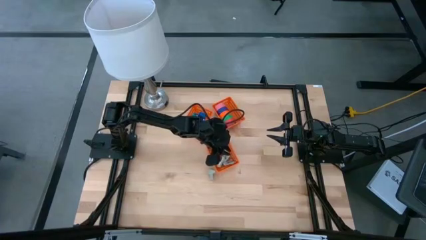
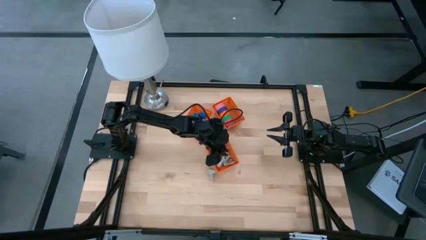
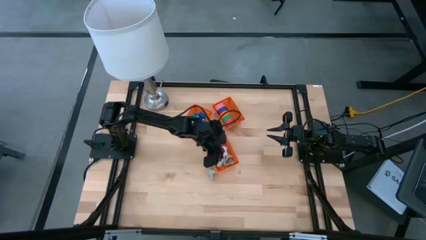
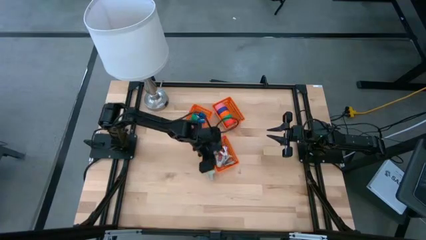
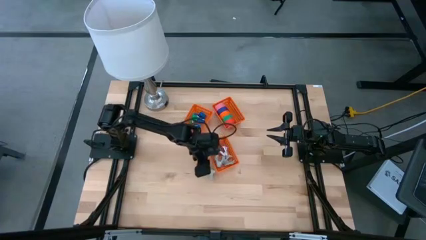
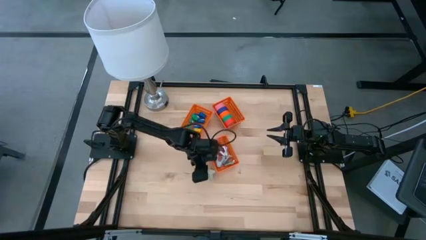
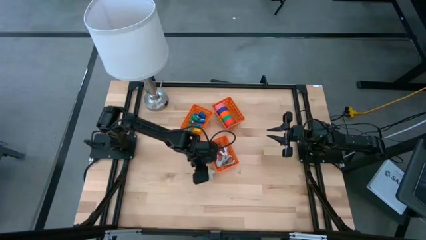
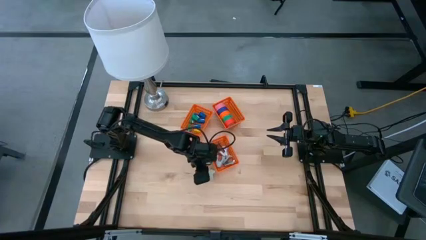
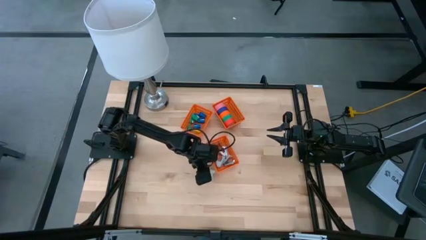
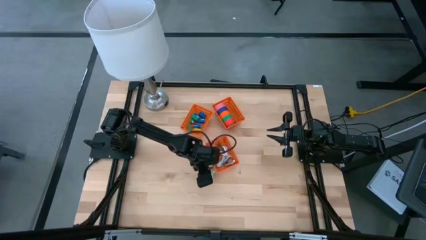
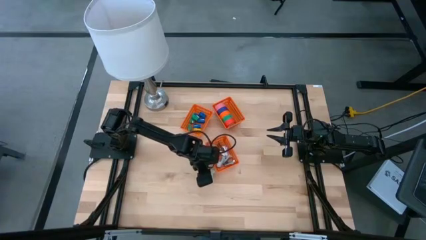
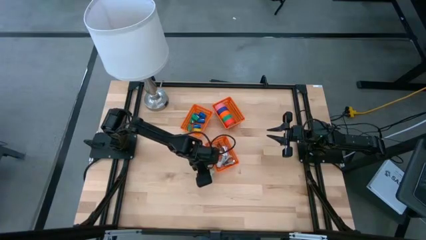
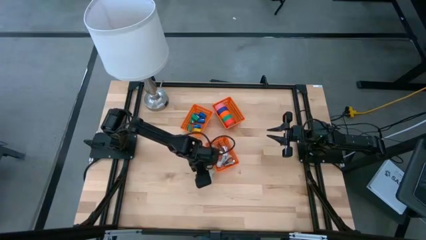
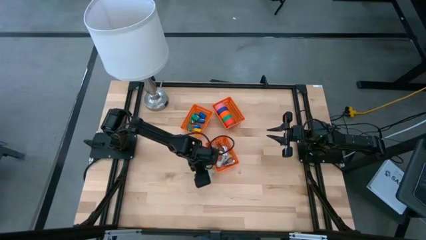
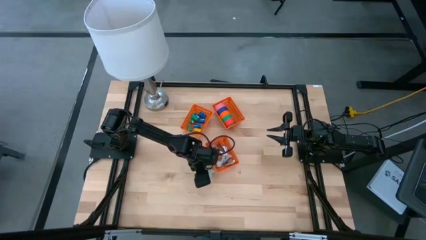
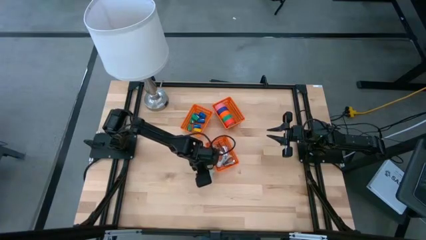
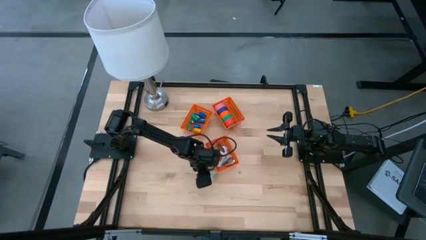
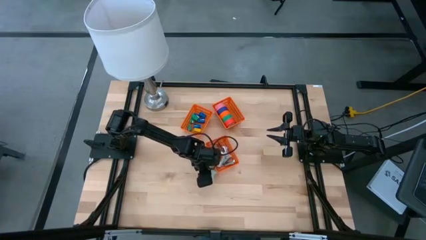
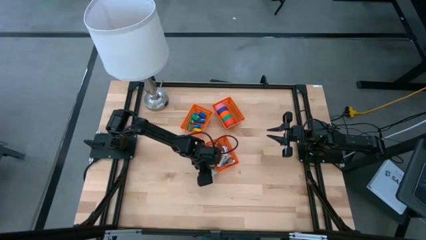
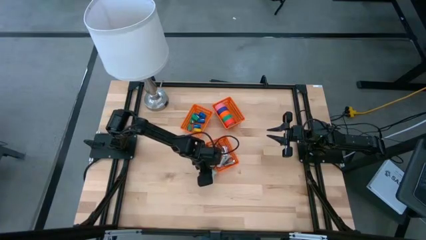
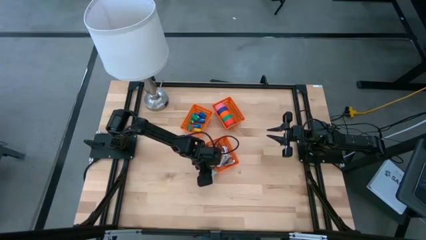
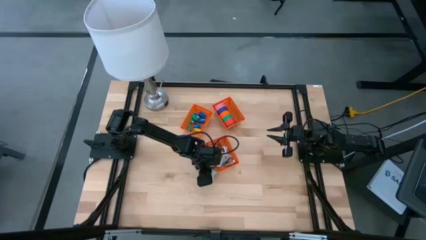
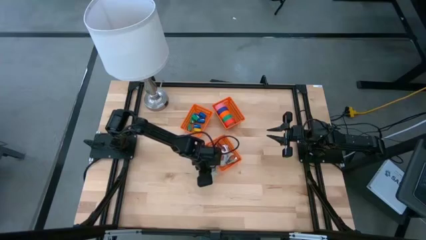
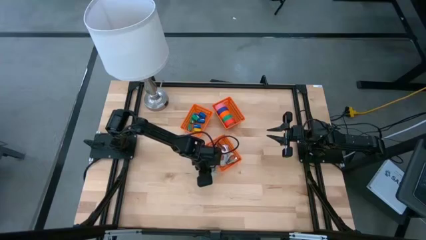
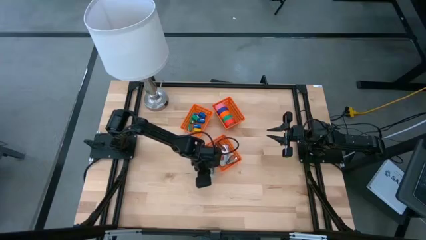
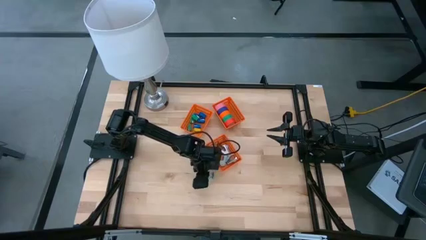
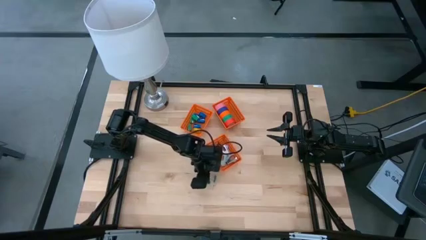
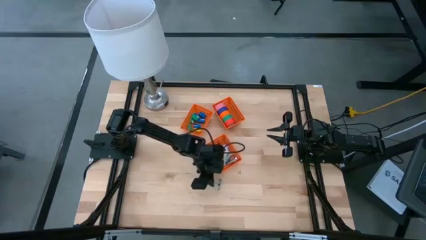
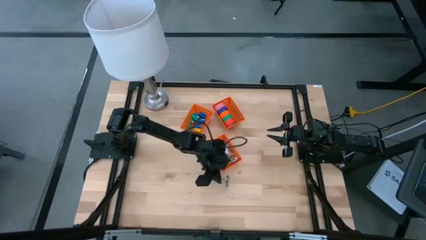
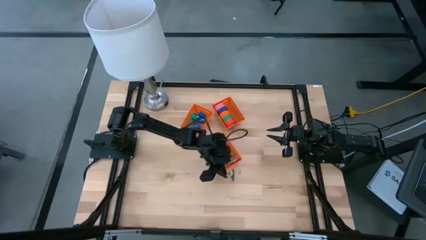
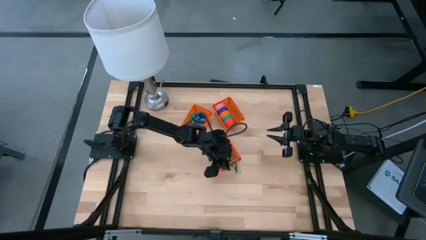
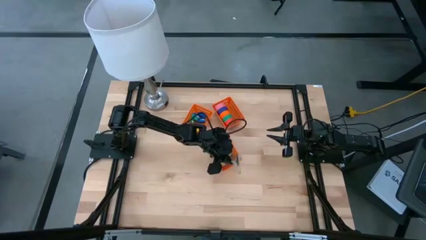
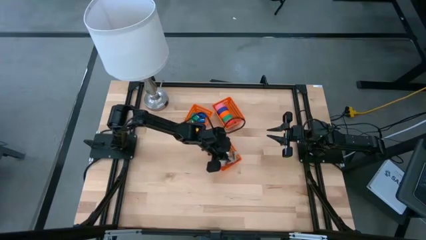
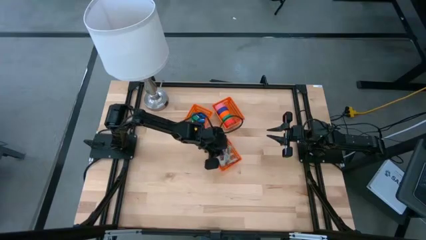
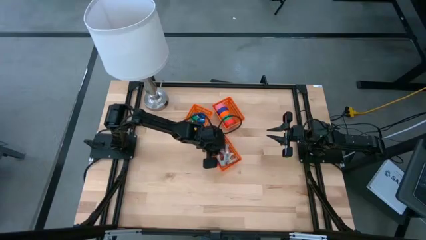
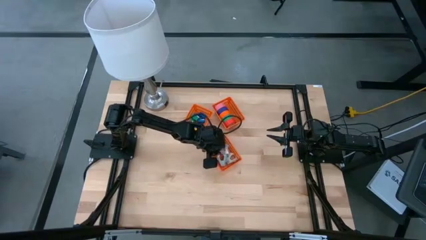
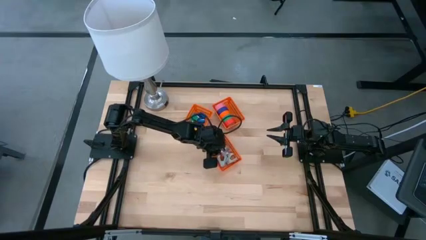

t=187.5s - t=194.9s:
Task: Pick and place Stapler, Stapler remover, tape
Put the gray staple remover into the middle orange bin

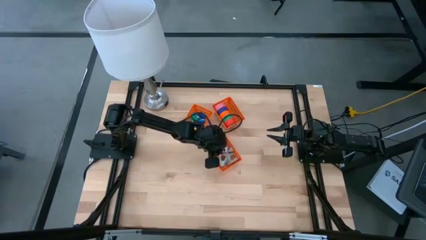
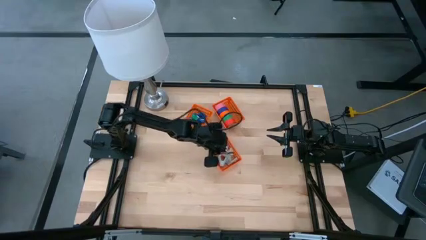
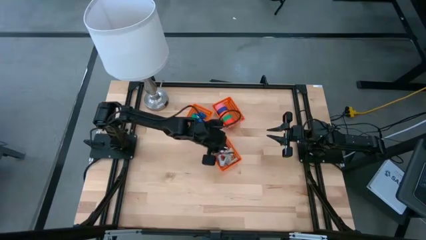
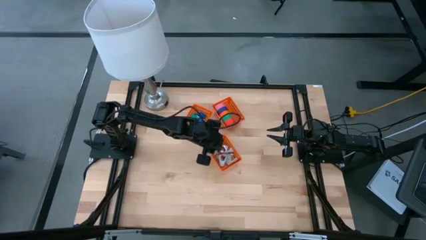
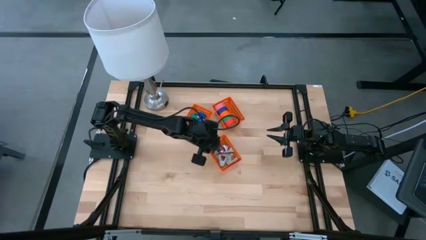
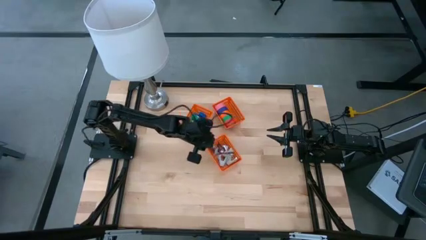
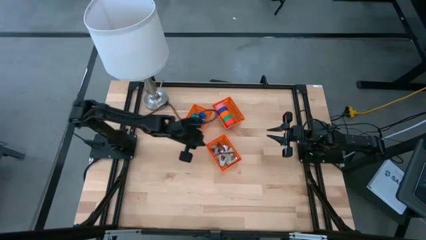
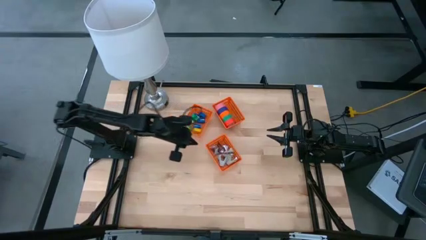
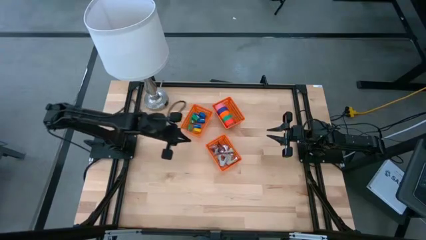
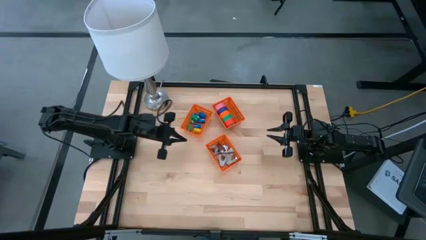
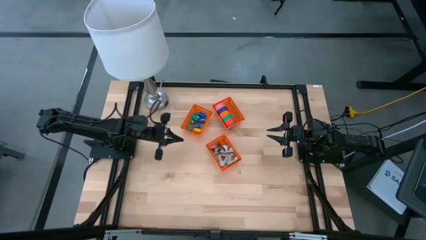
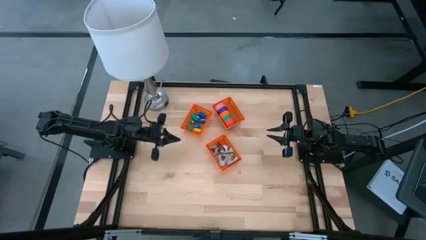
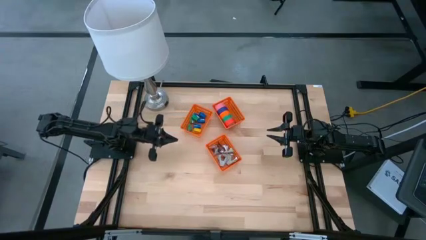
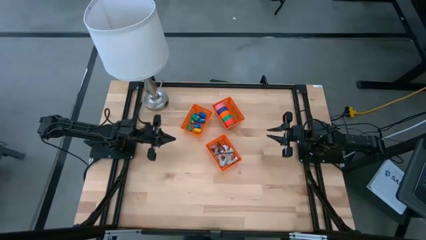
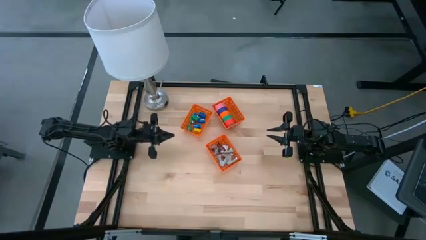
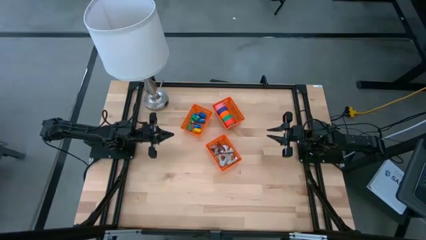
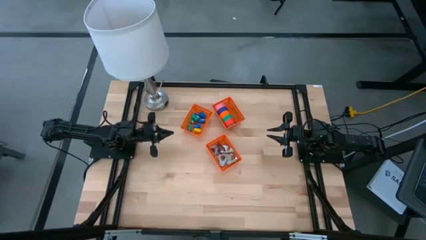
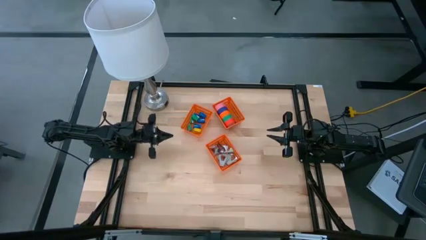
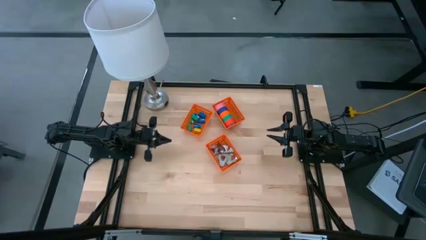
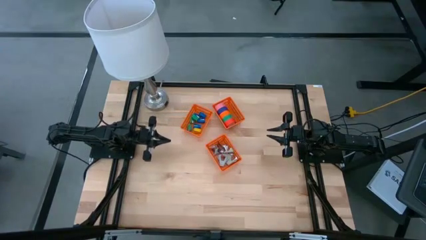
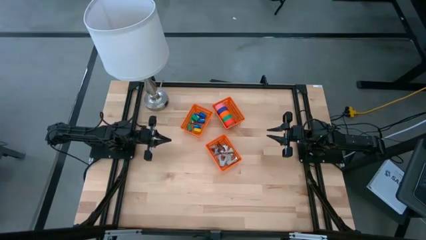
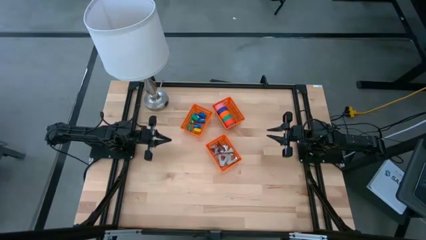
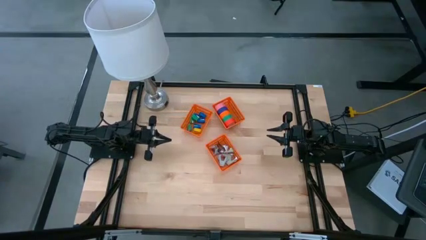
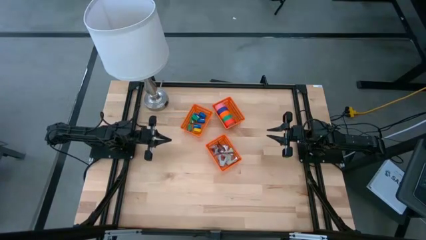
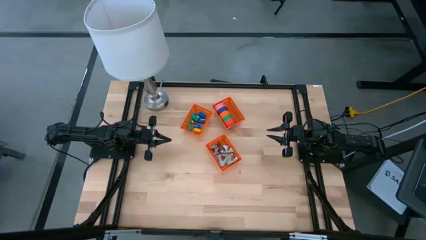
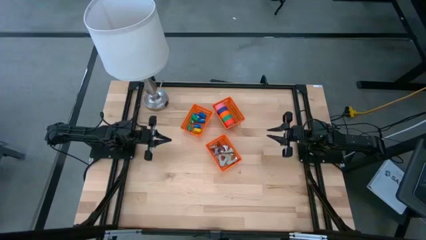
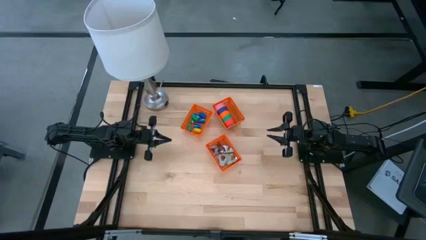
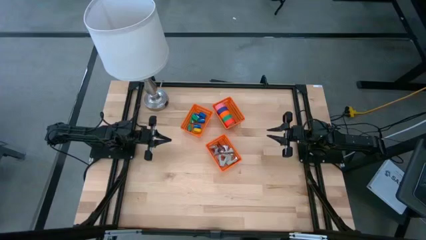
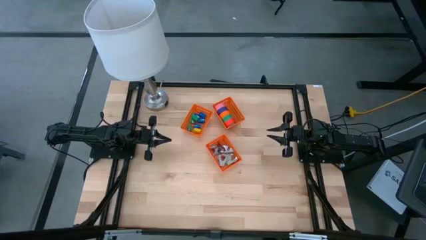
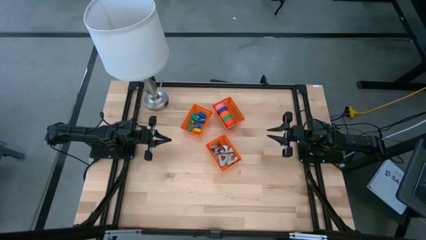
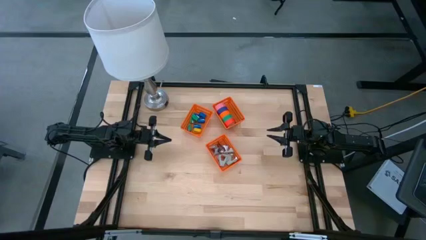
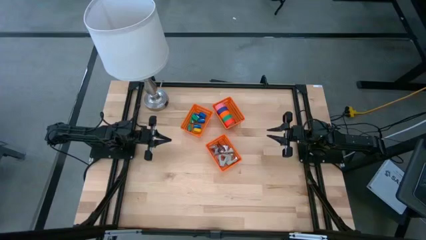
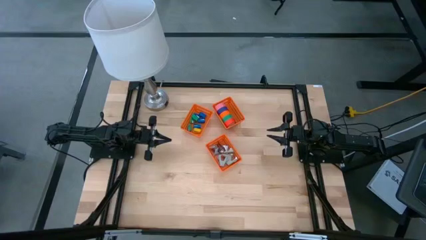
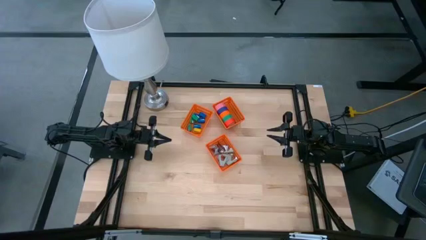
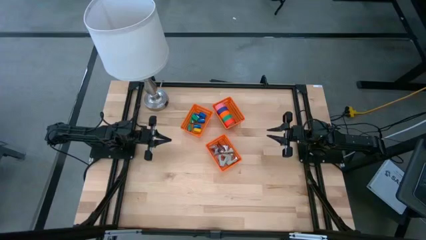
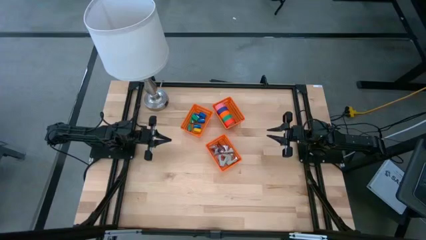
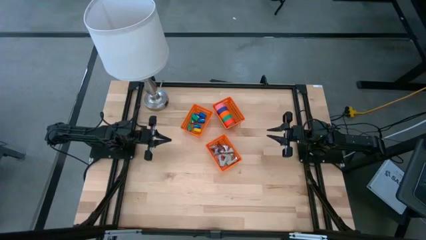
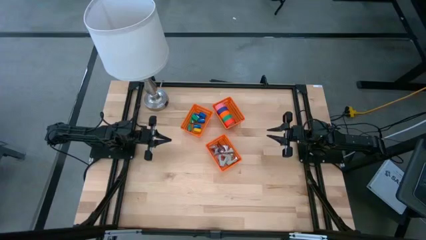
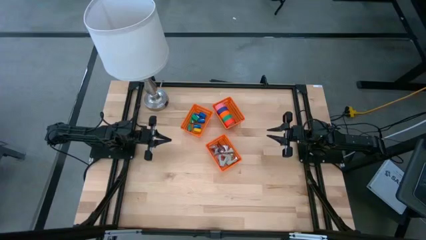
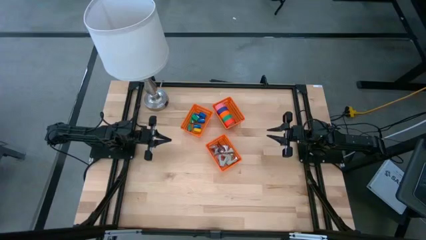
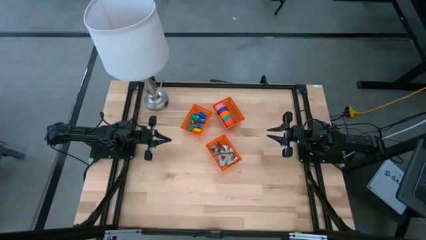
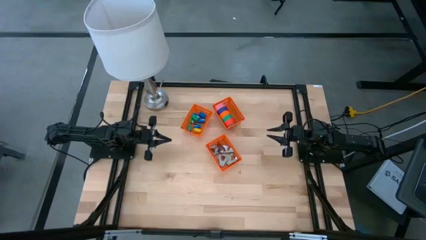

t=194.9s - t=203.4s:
Return to Home Position
